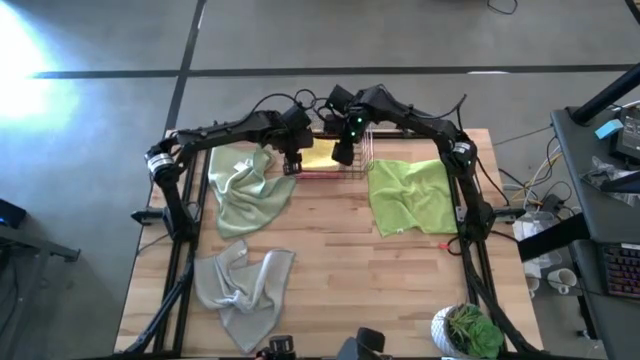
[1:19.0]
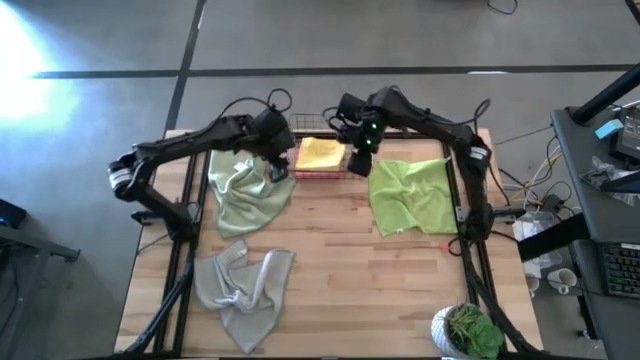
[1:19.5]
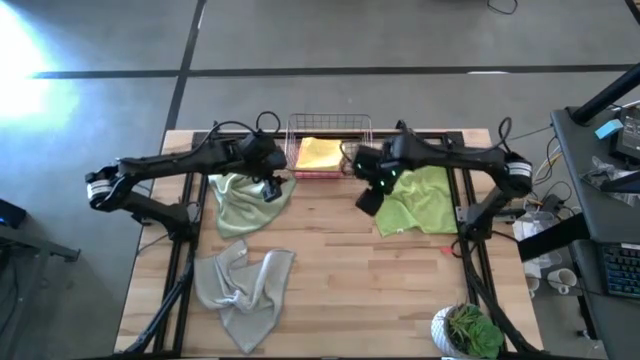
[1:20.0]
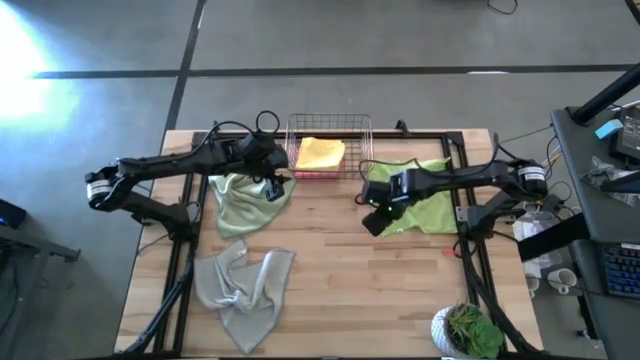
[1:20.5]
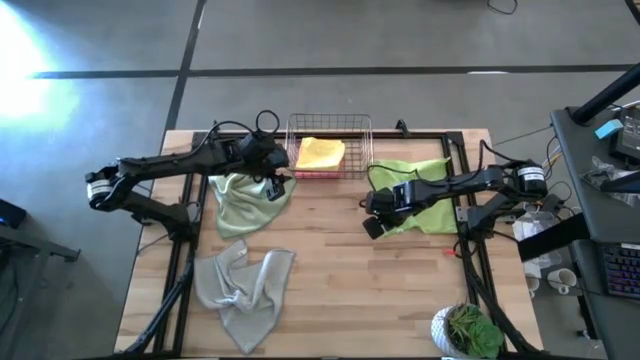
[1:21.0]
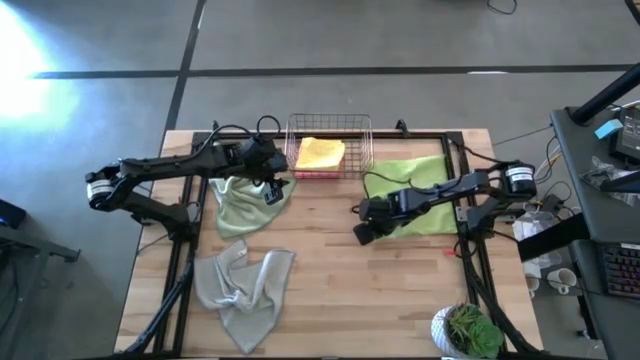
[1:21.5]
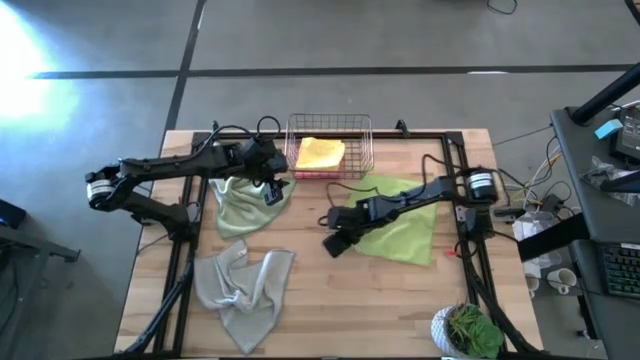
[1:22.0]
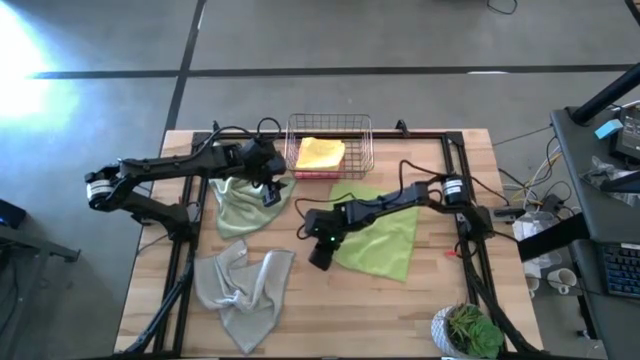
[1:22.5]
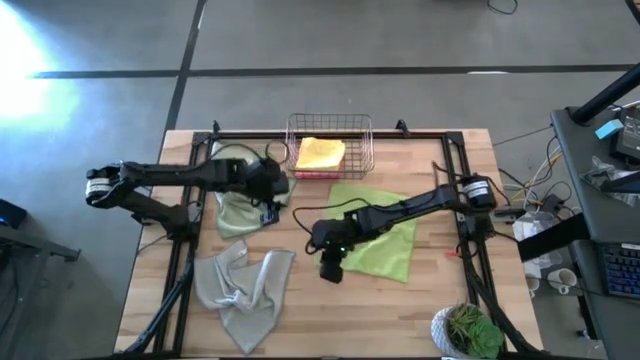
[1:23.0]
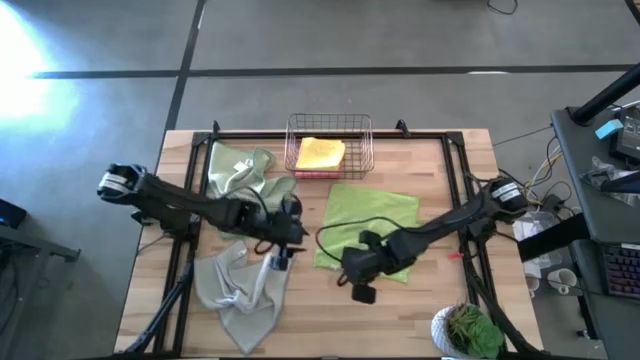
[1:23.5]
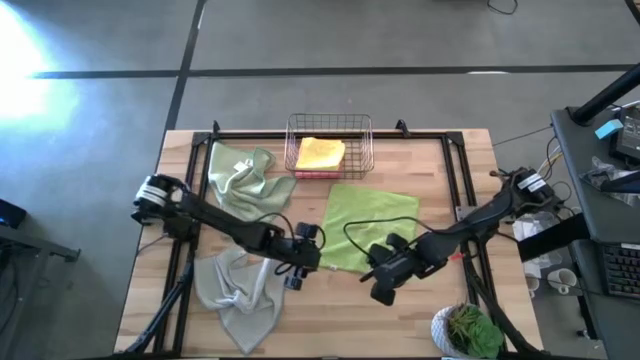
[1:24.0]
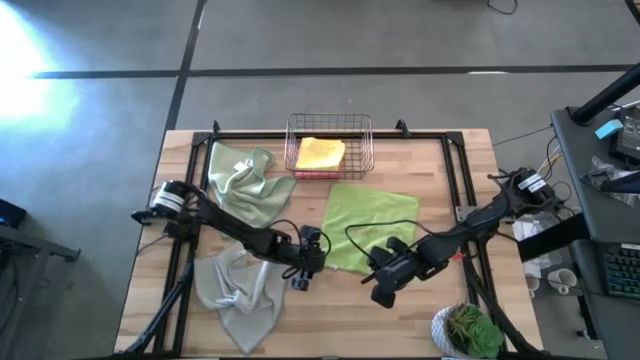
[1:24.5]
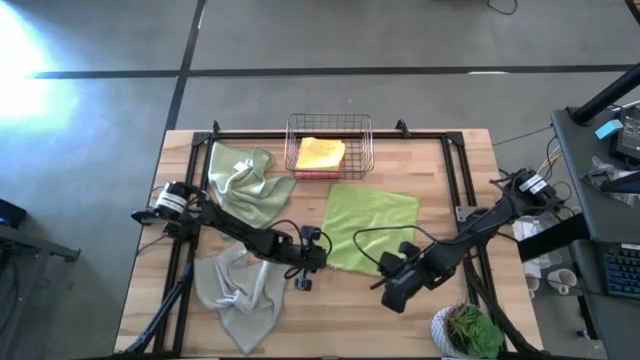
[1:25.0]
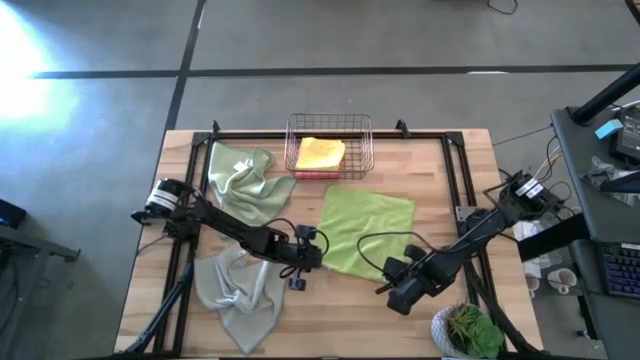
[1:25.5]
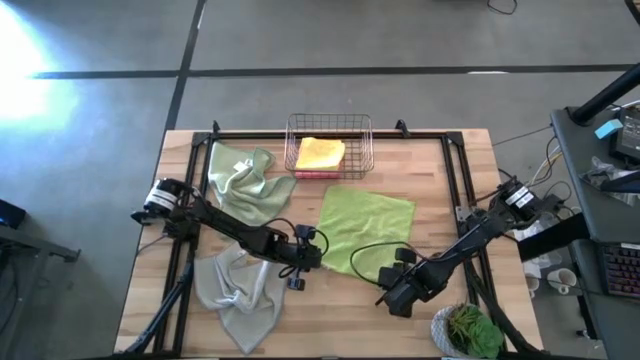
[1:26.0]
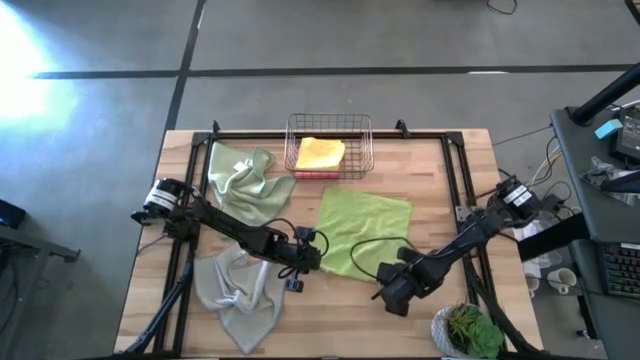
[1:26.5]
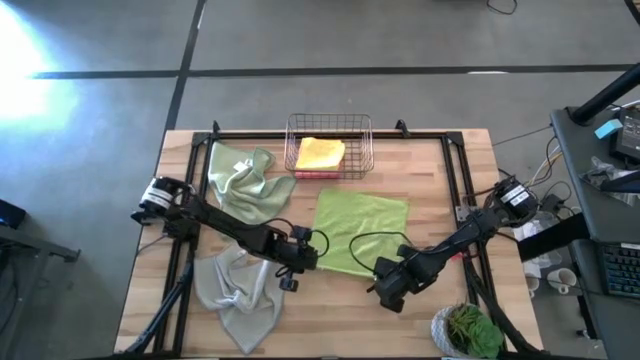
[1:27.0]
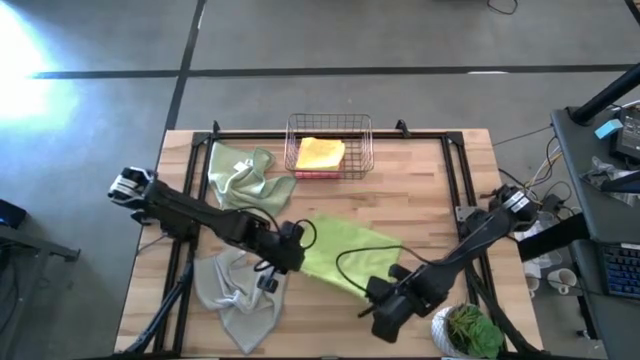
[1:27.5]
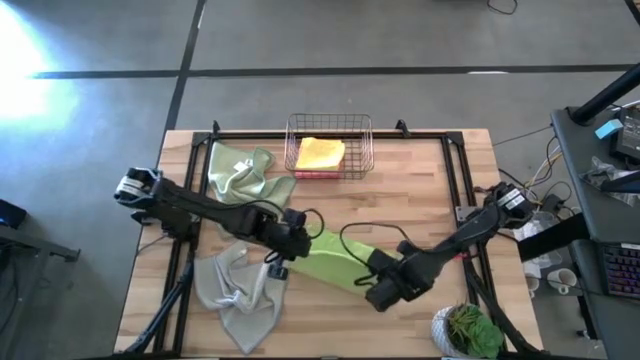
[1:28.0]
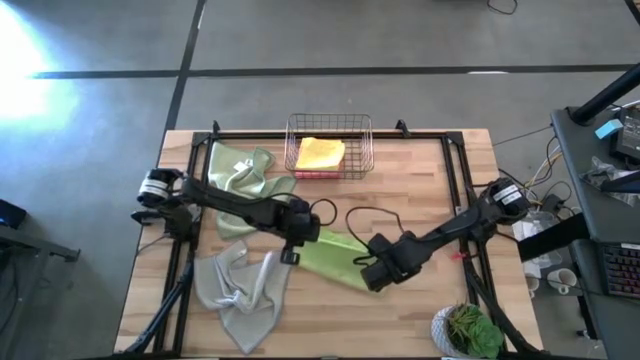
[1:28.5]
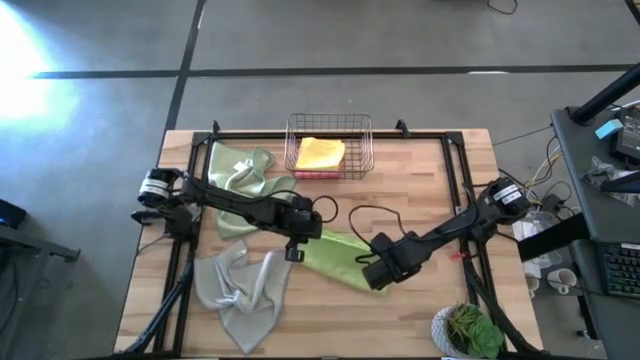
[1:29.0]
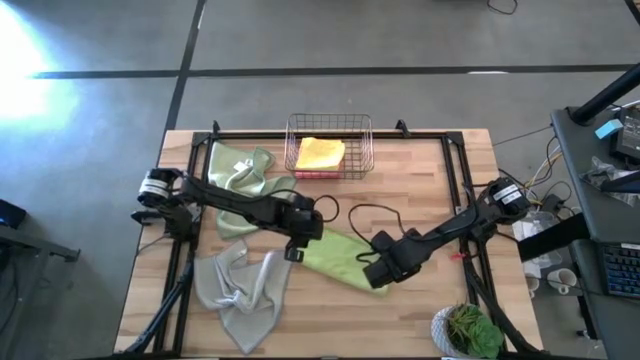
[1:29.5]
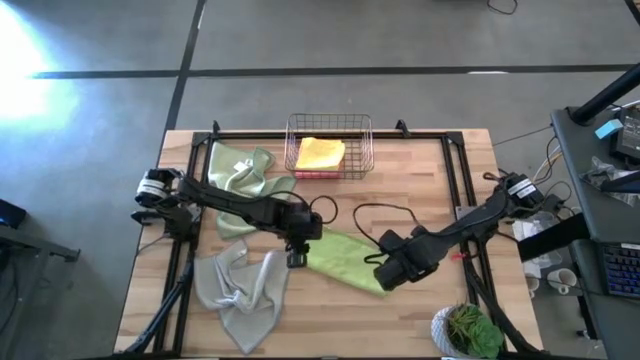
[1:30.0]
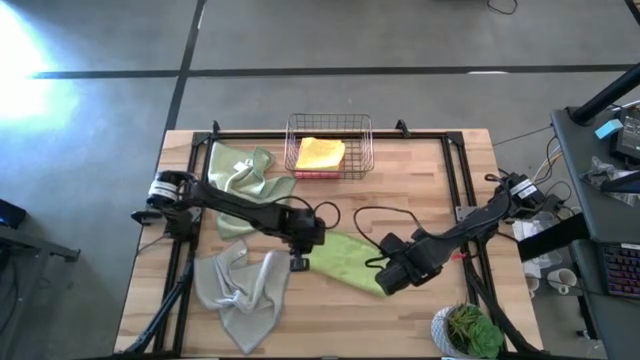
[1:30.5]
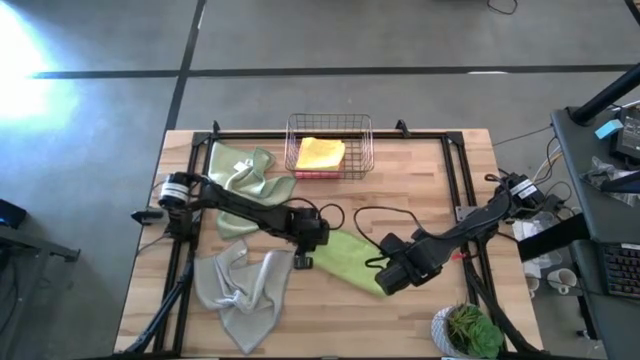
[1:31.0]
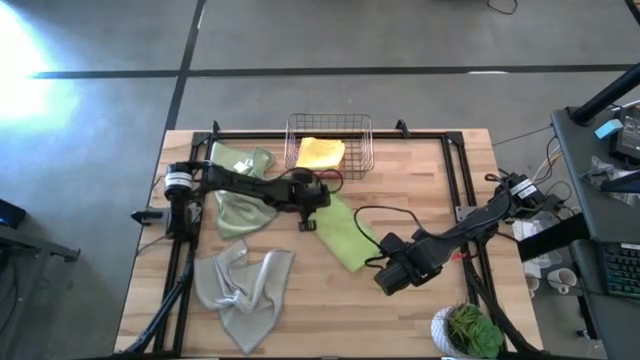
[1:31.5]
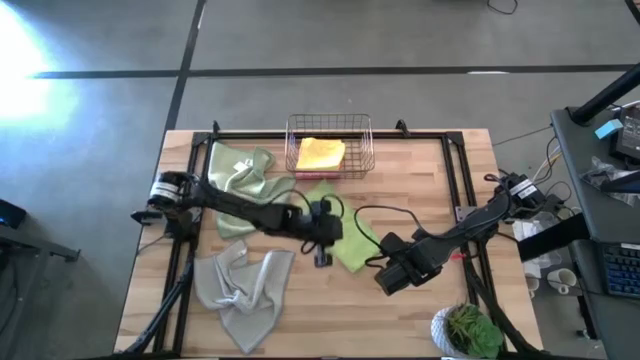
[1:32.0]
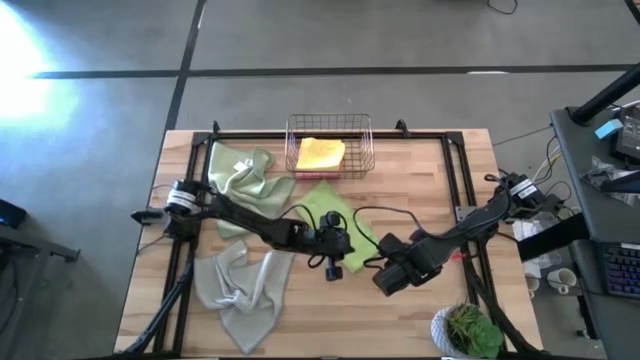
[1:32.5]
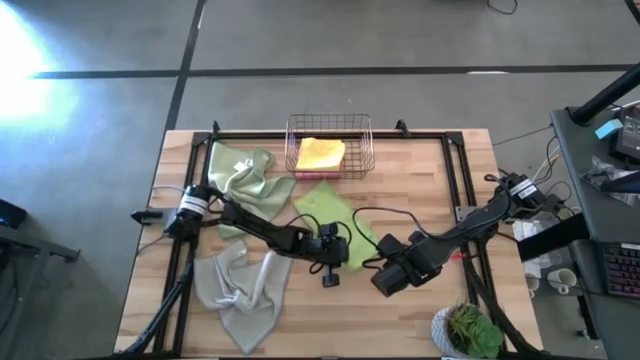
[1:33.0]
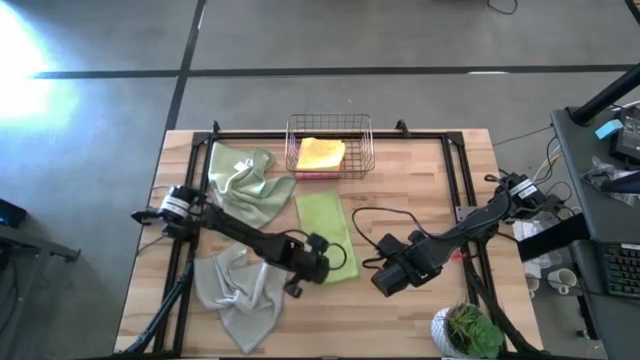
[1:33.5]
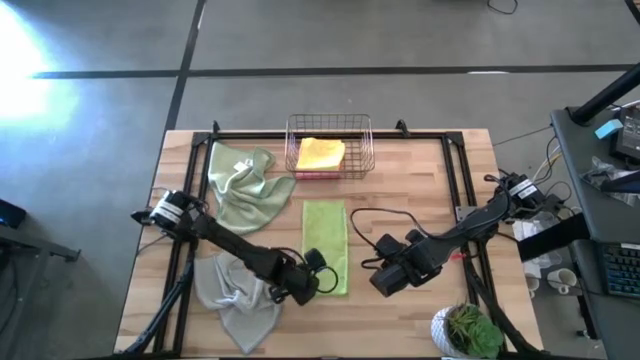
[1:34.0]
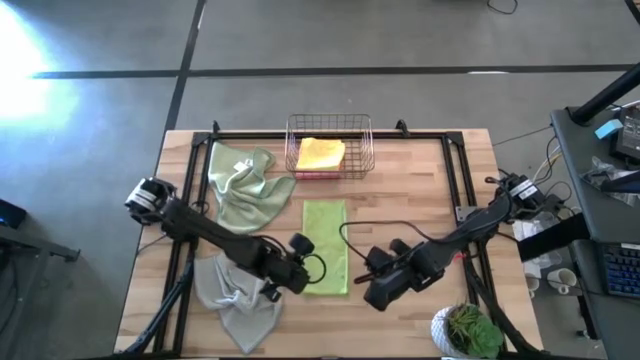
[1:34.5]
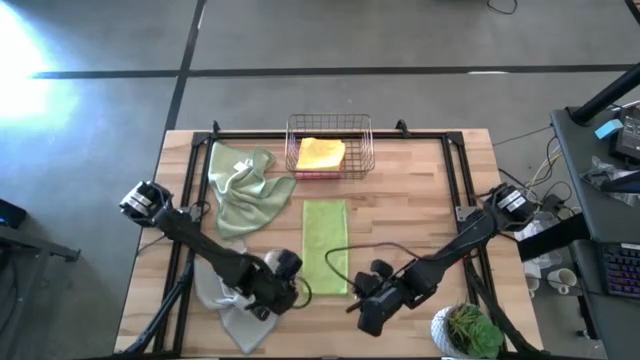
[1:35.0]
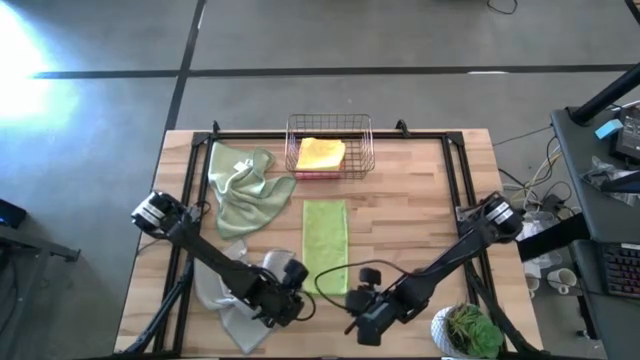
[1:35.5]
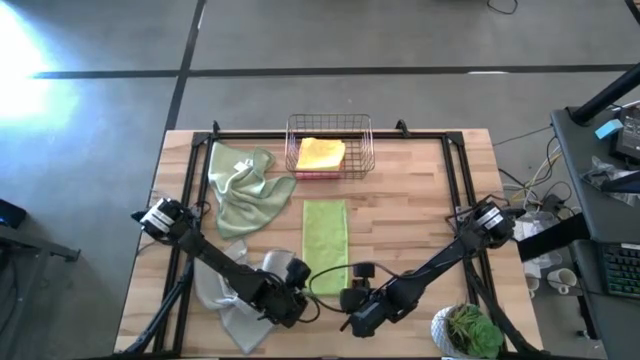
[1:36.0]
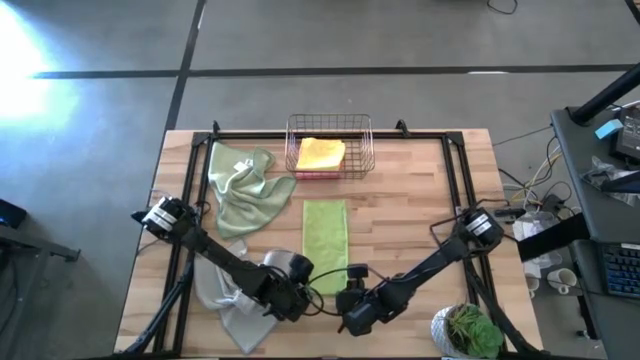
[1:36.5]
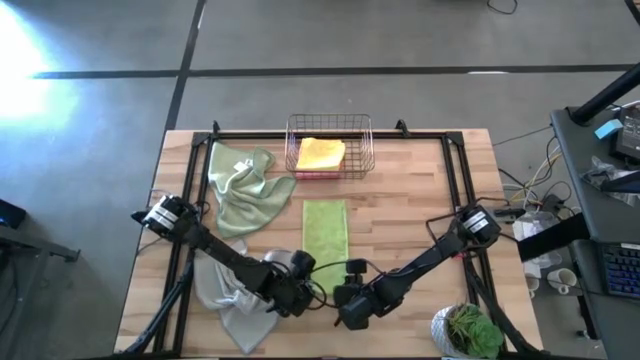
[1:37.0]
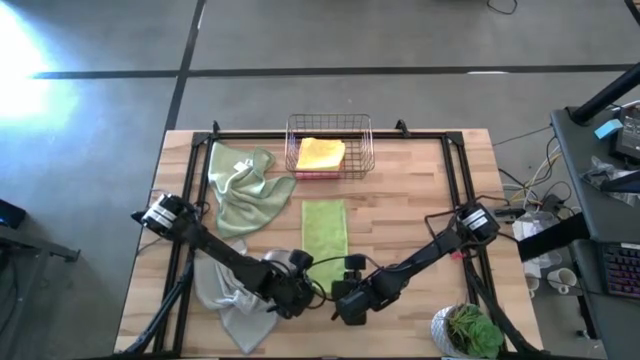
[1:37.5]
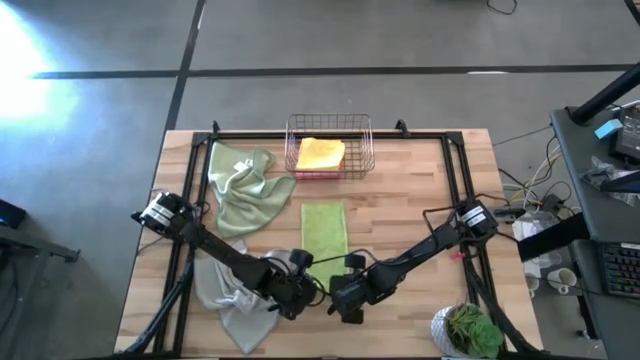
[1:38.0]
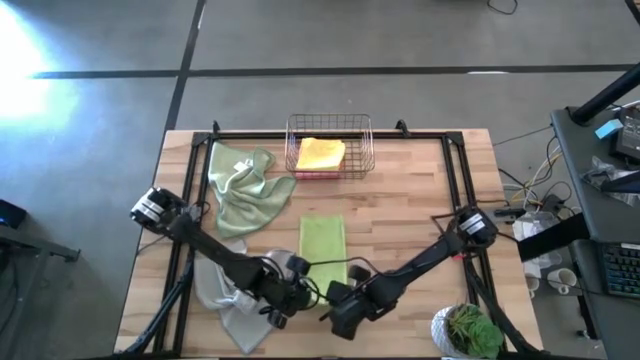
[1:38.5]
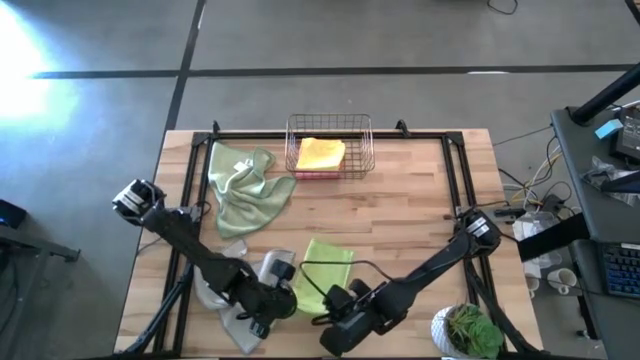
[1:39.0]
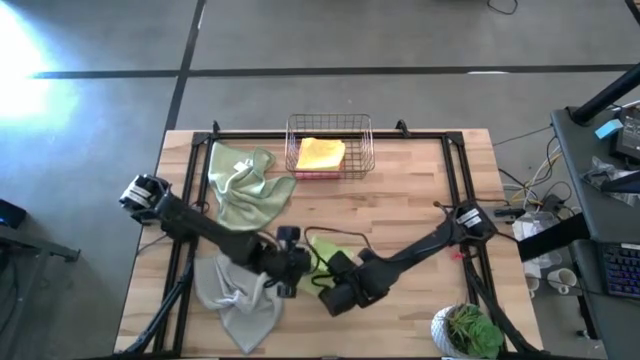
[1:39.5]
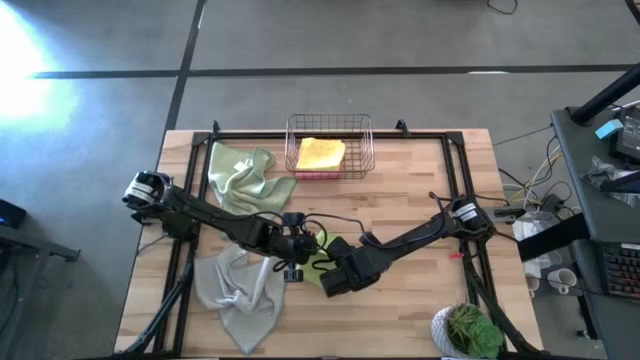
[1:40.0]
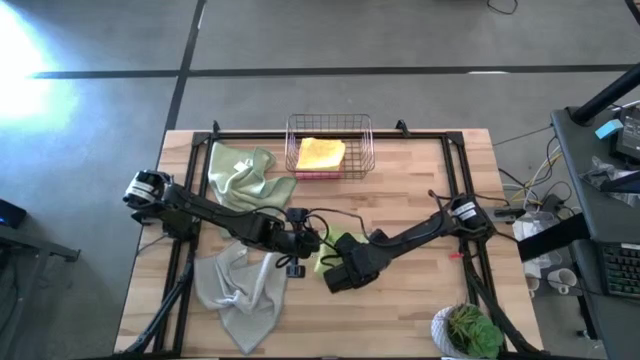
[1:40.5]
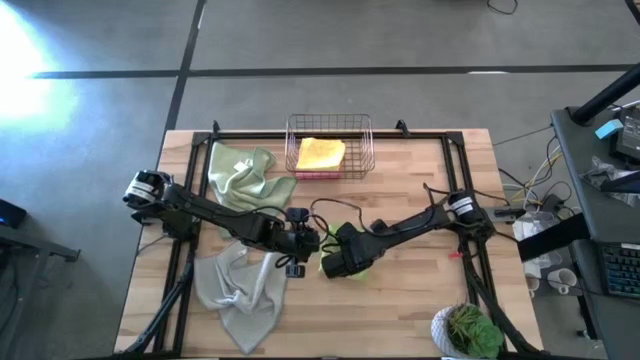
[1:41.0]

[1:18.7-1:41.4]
Task: Fold microfiber towels
Fold the green microfiber cloth
